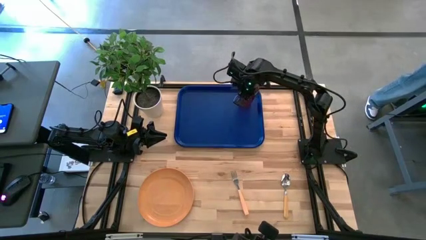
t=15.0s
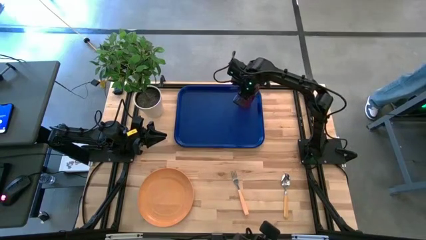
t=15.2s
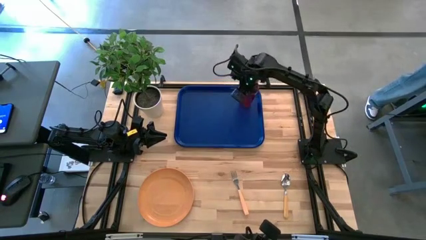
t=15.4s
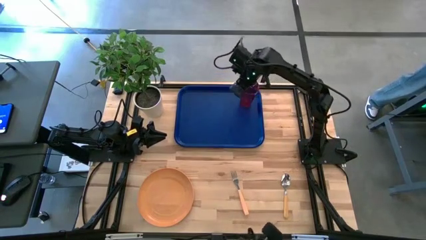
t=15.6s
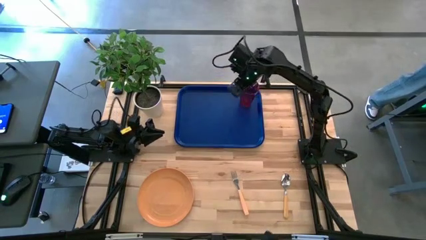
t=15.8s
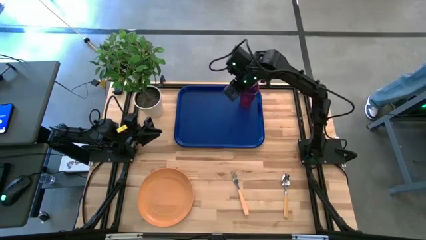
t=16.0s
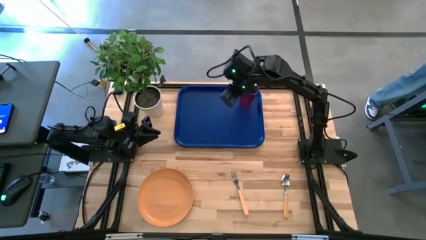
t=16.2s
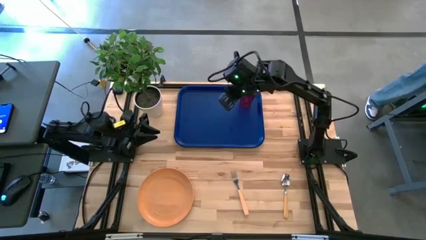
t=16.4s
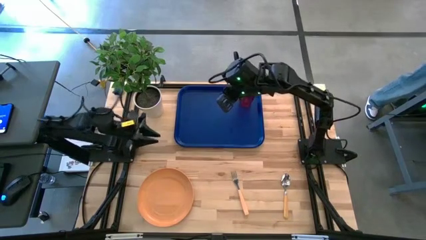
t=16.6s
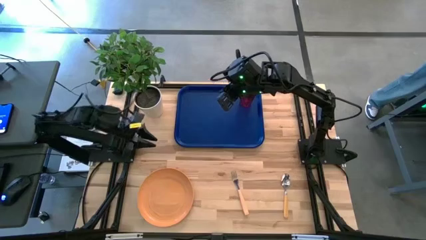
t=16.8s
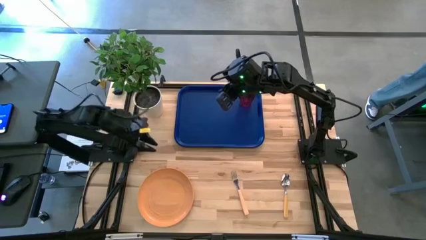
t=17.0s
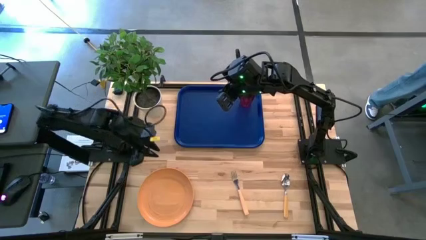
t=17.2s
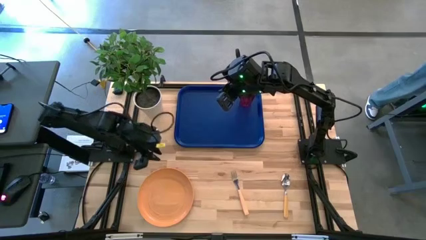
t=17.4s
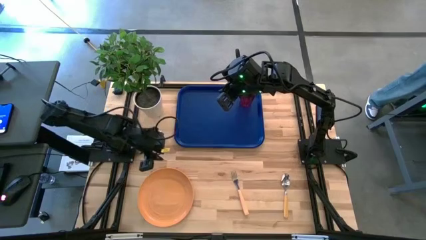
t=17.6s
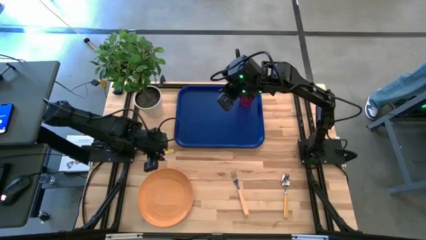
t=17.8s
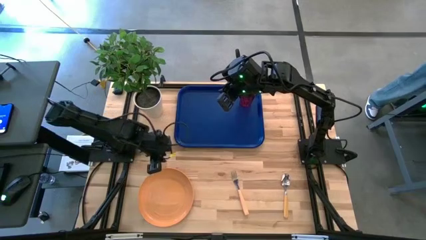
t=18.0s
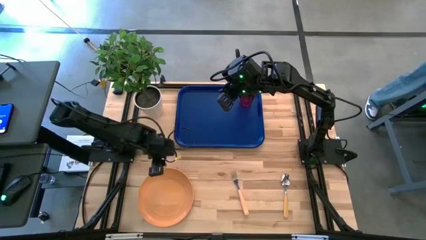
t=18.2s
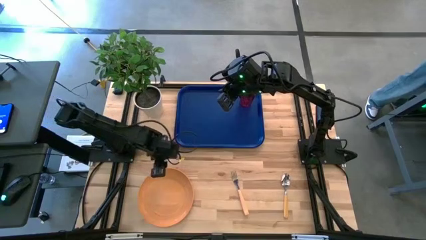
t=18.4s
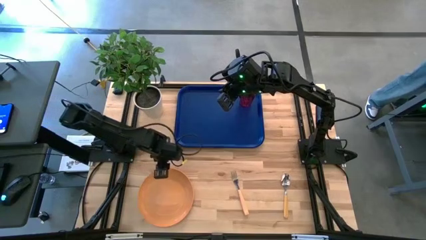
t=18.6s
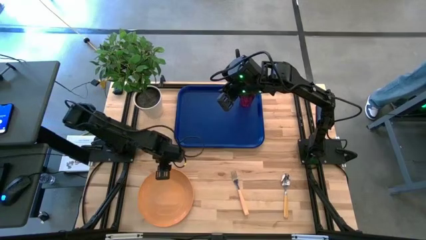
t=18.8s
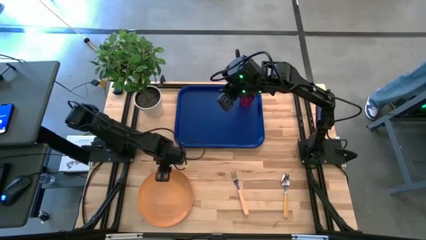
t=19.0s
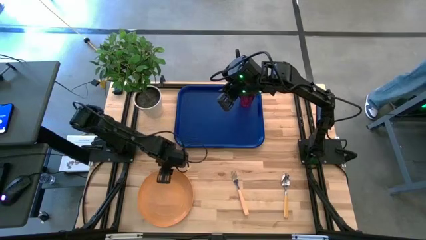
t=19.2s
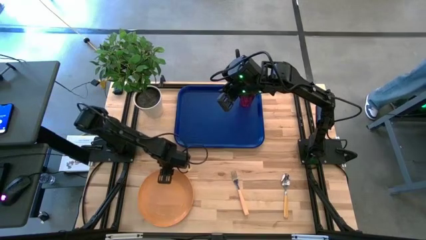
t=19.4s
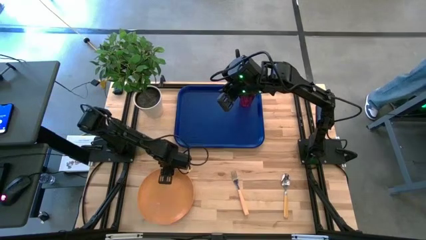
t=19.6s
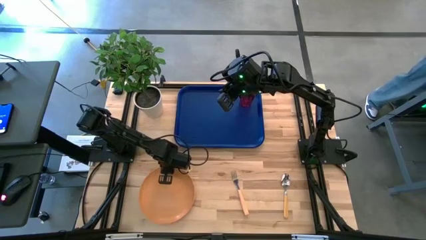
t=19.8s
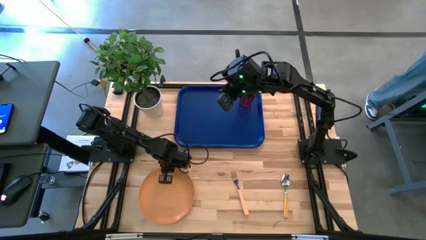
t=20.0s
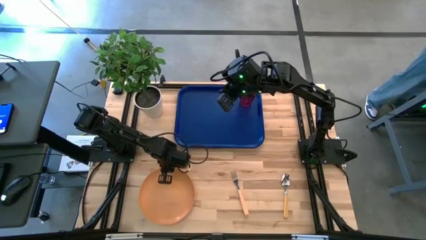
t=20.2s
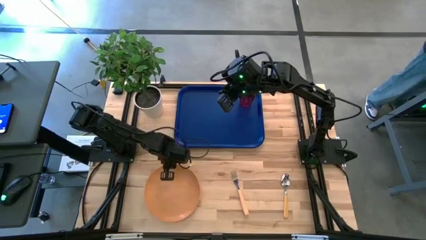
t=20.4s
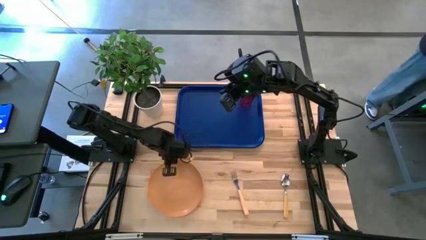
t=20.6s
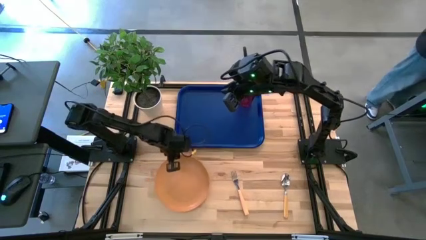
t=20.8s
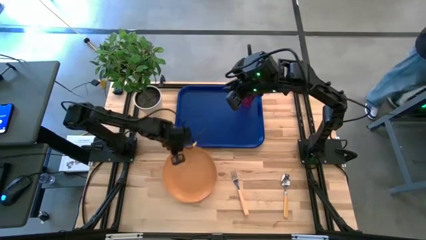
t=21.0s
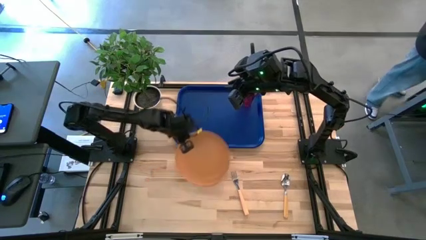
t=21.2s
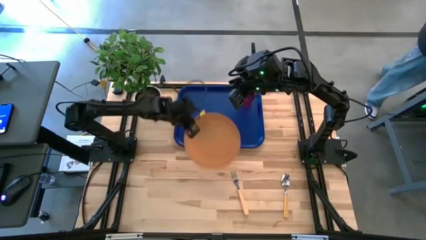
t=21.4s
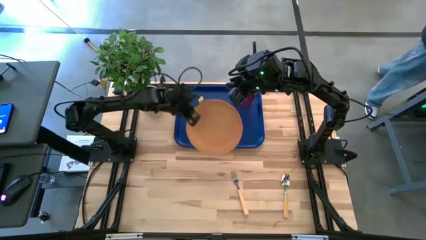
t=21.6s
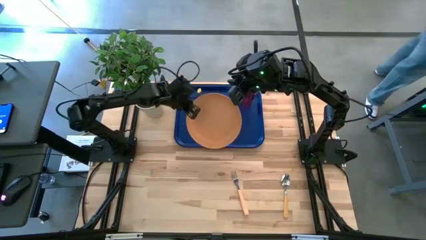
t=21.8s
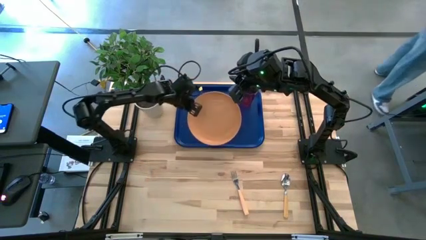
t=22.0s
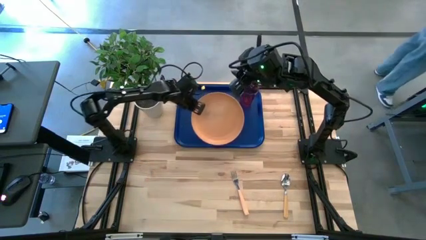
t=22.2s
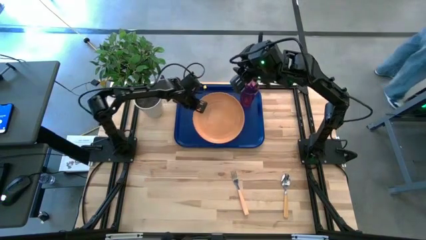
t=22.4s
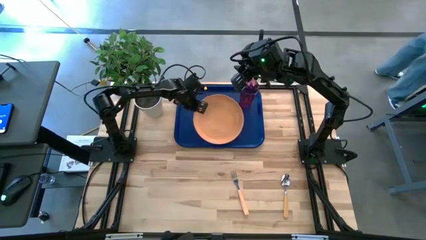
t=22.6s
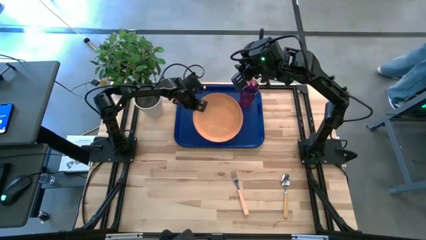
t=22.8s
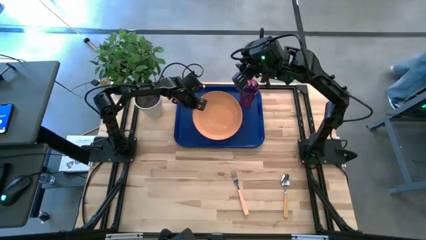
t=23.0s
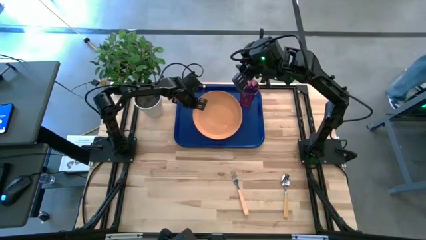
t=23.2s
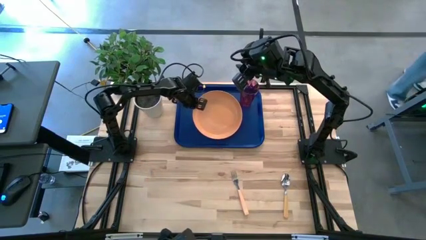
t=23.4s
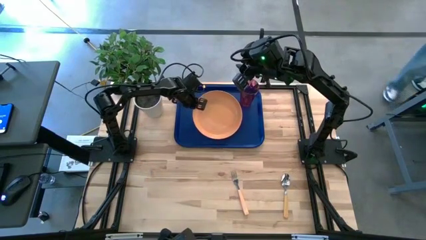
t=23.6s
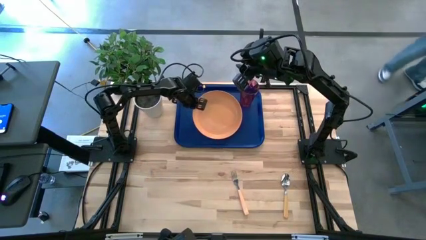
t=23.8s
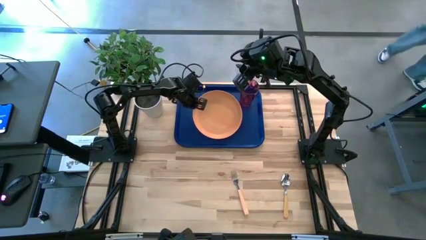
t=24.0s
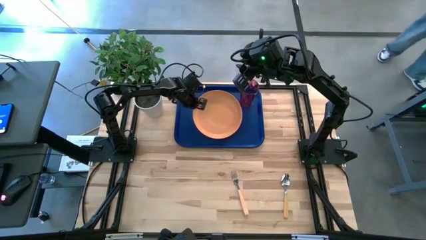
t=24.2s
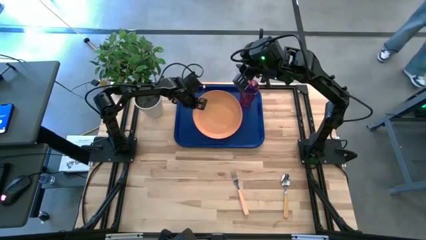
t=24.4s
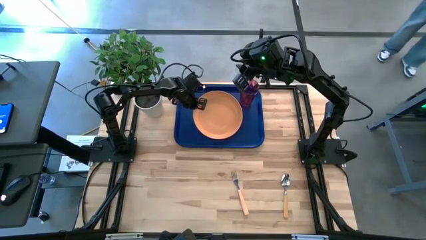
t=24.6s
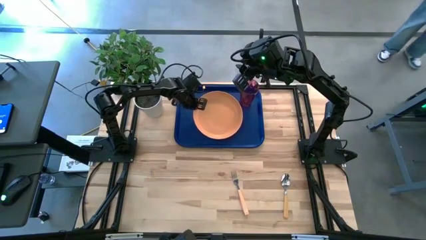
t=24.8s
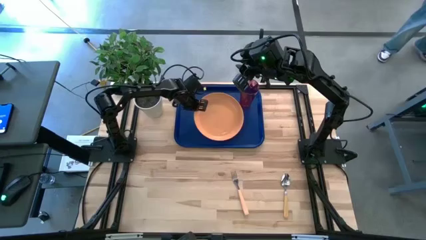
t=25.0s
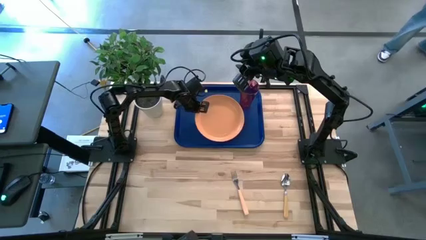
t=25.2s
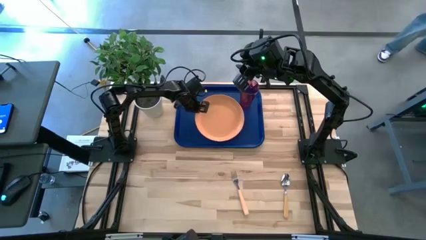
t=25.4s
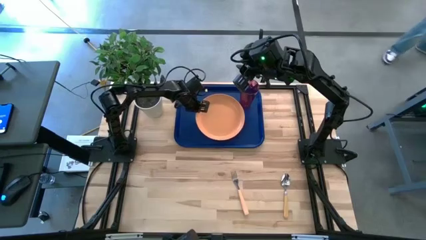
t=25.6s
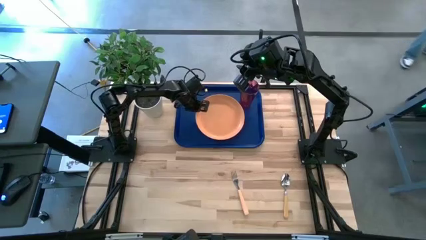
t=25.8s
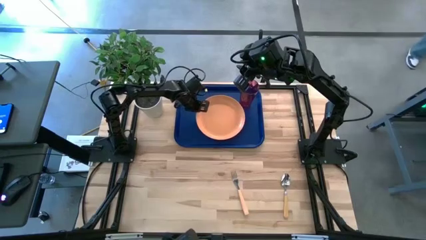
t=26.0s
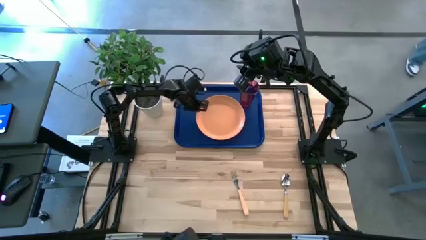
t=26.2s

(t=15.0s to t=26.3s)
Task: Pick and place plate/cup/fork/spoon on tray
Put the plate on the tray to the bottom of the cup
